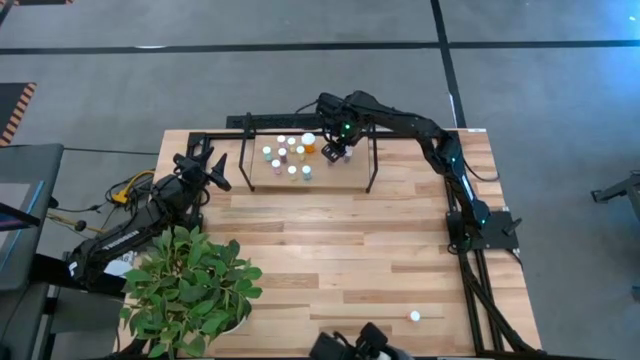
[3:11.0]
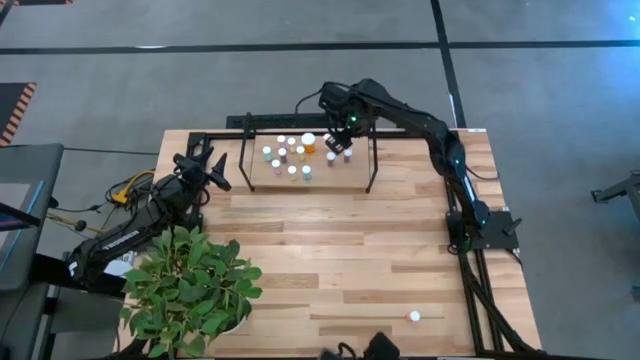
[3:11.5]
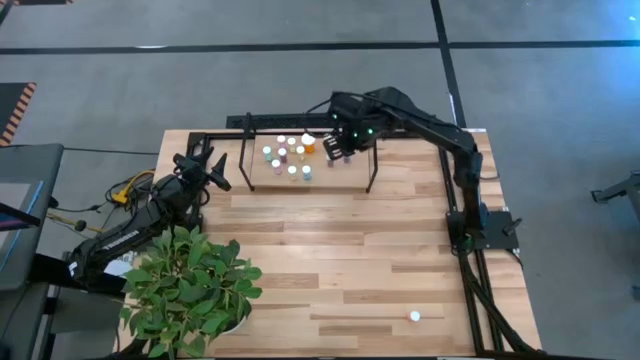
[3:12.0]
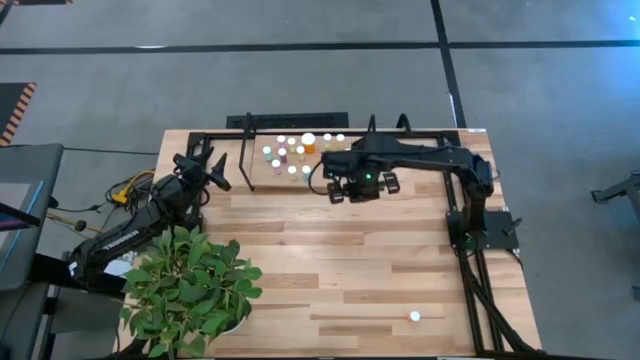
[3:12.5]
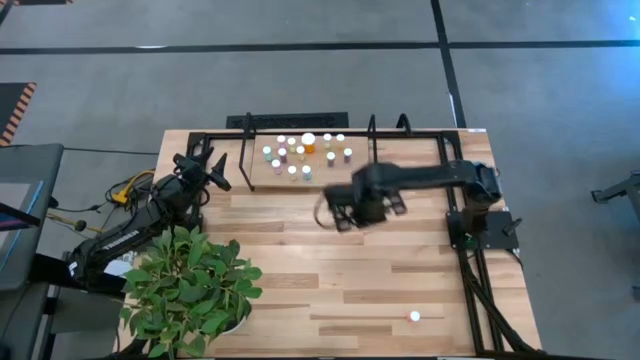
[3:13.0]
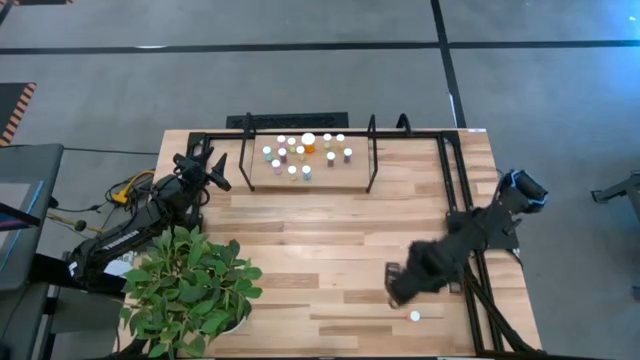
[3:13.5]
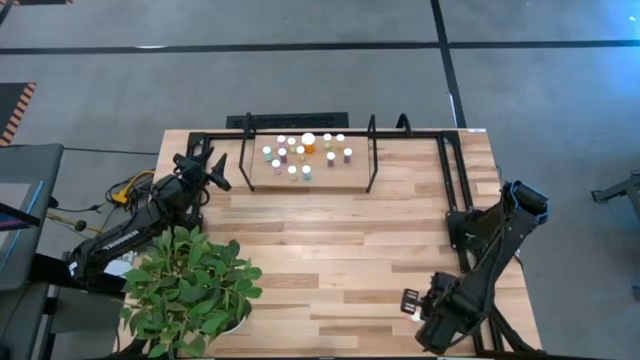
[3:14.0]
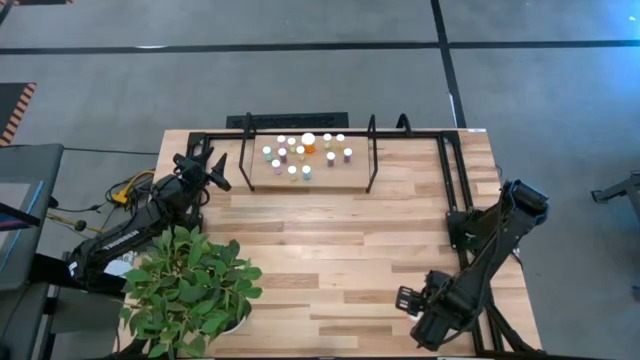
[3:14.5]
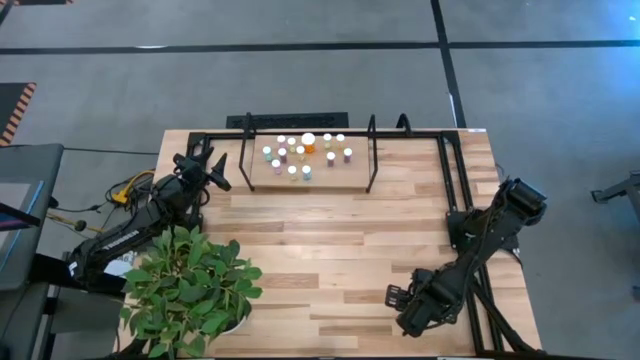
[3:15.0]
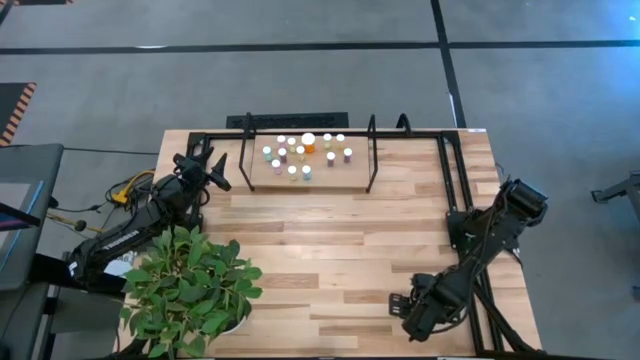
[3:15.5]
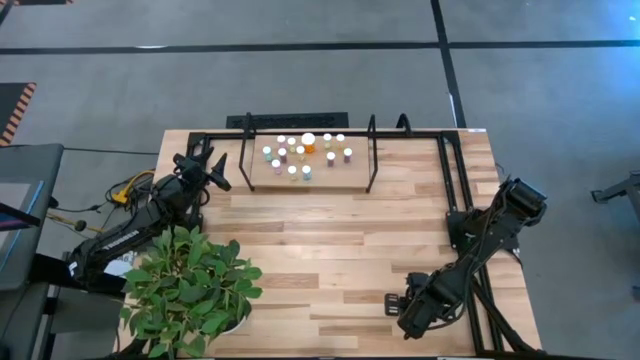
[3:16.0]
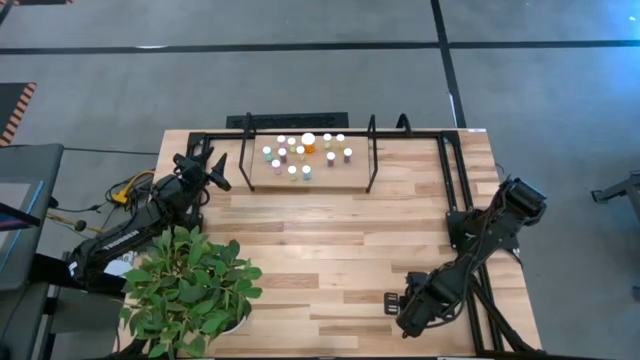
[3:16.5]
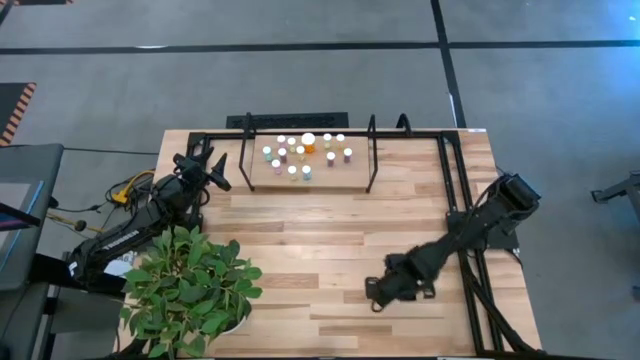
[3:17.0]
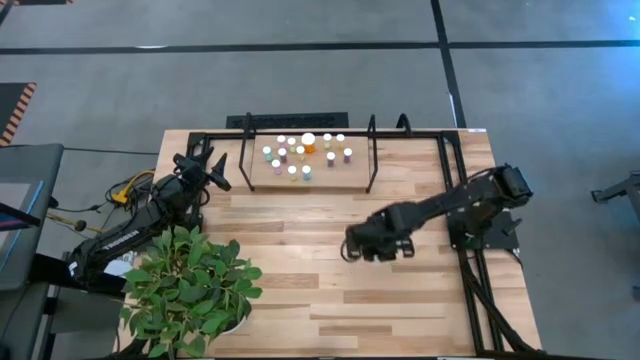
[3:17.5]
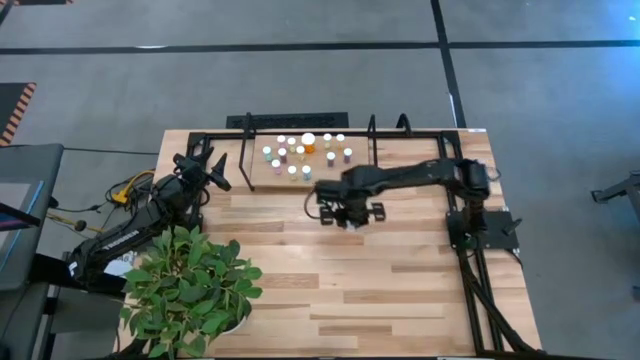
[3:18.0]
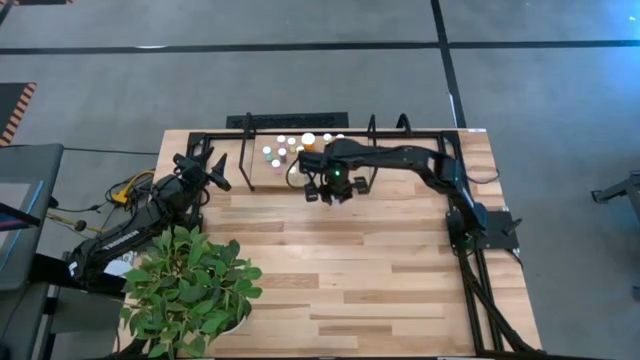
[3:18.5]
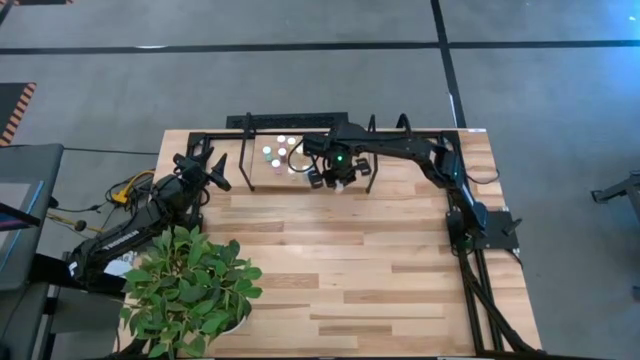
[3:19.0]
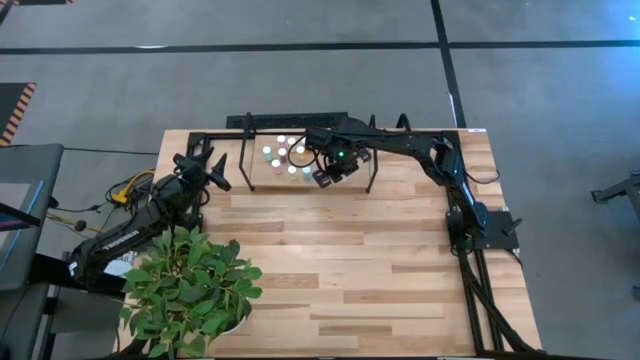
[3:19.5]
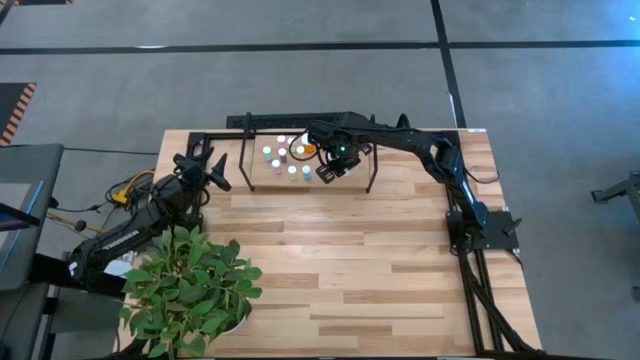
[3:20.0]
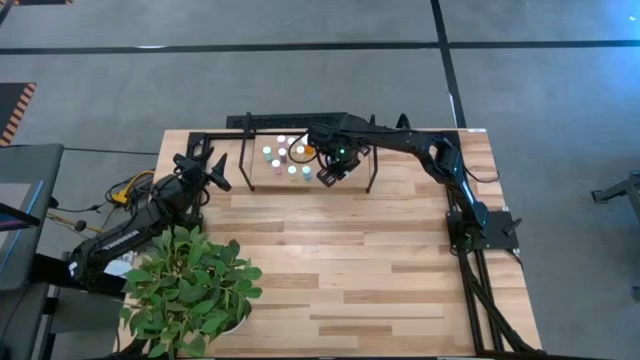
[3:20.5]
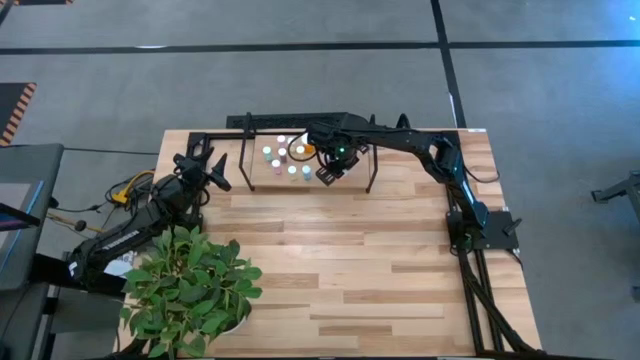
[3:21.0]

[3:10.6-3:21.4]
Task: Pick and place medicine bottles onto shelf by color
Put the red pill bottle on the shelf

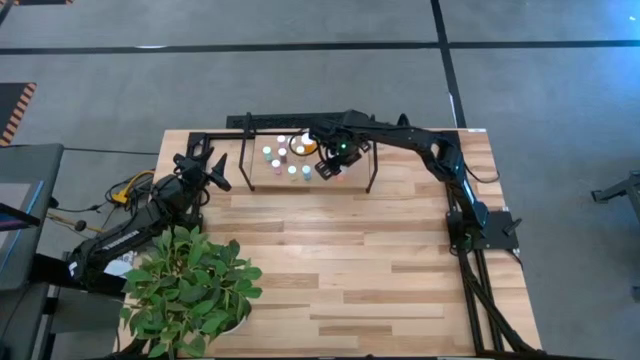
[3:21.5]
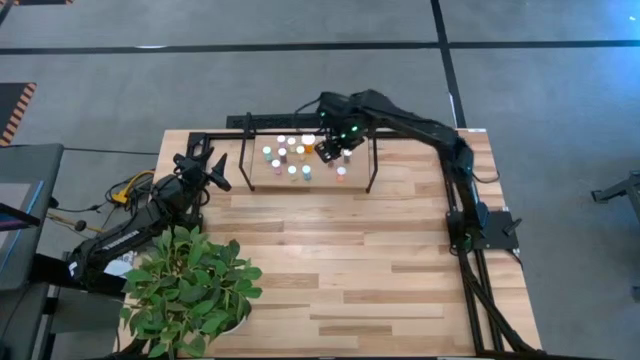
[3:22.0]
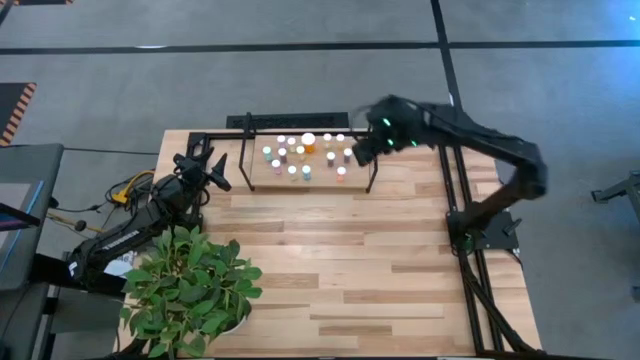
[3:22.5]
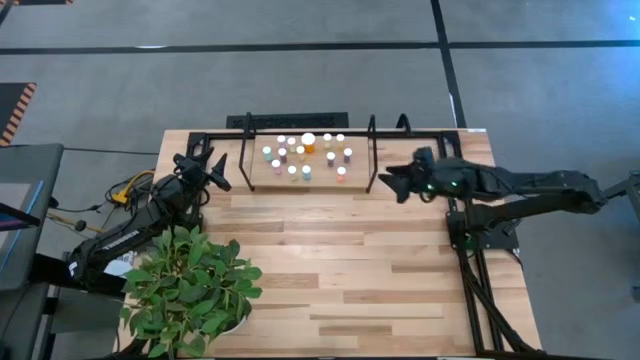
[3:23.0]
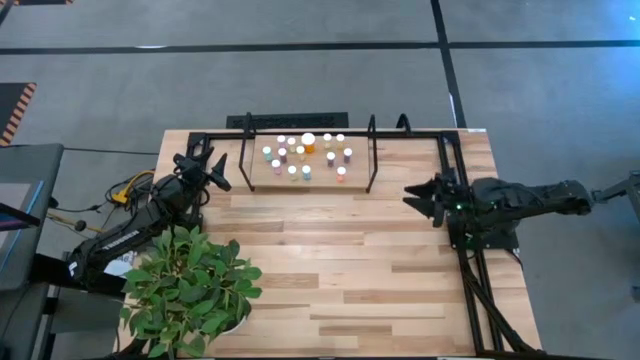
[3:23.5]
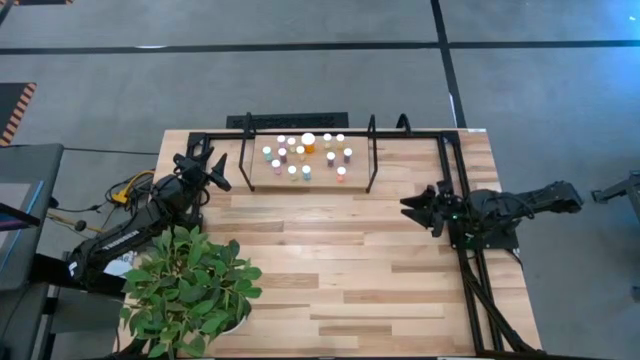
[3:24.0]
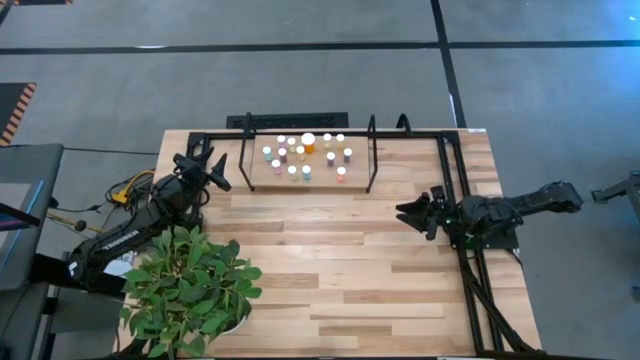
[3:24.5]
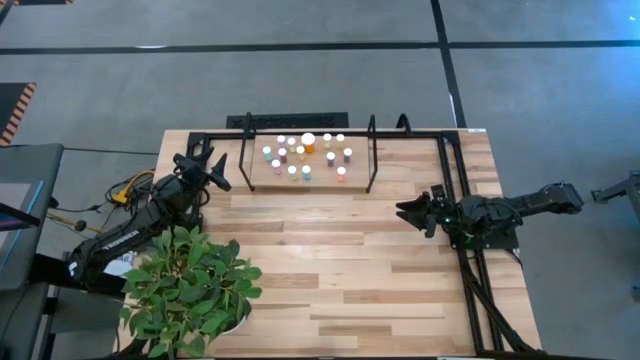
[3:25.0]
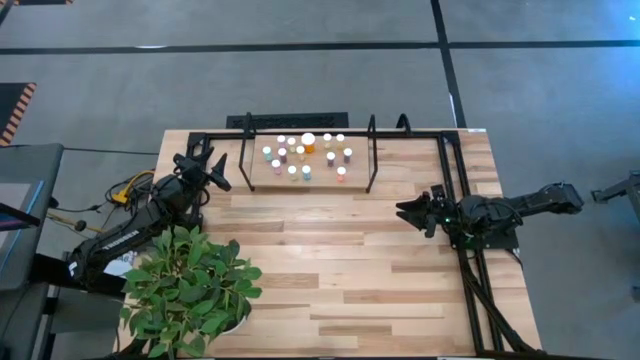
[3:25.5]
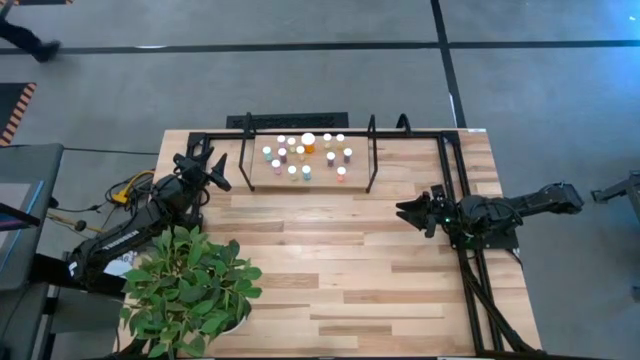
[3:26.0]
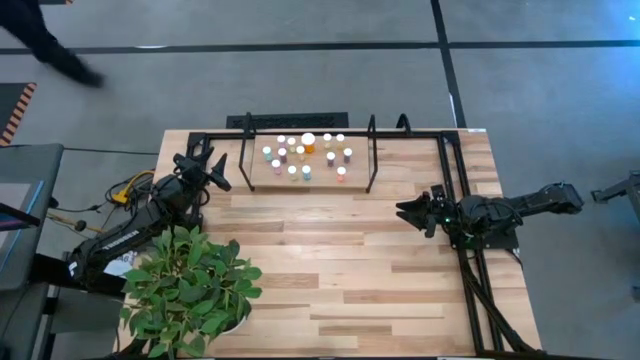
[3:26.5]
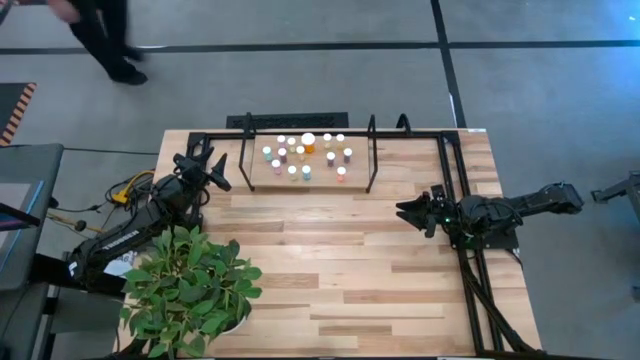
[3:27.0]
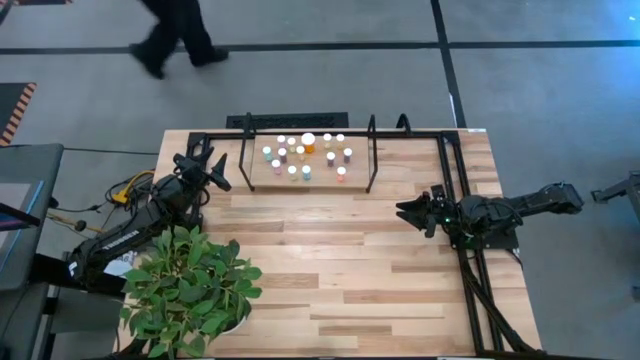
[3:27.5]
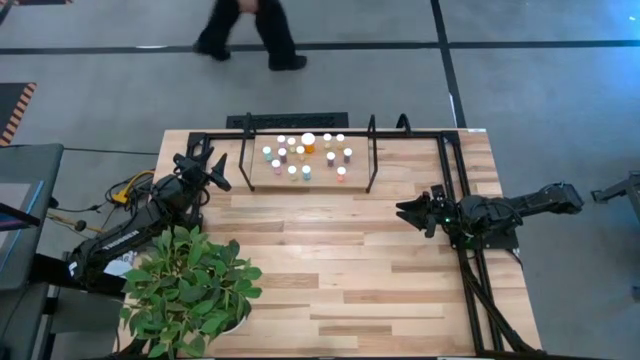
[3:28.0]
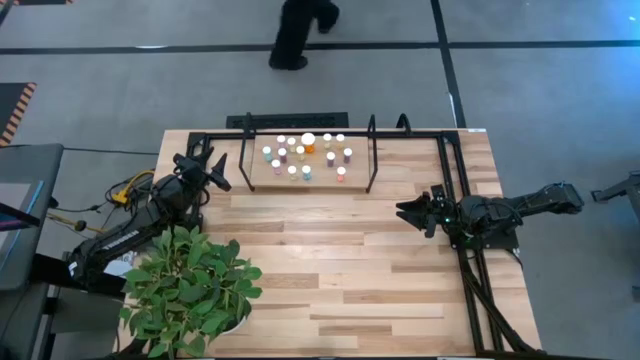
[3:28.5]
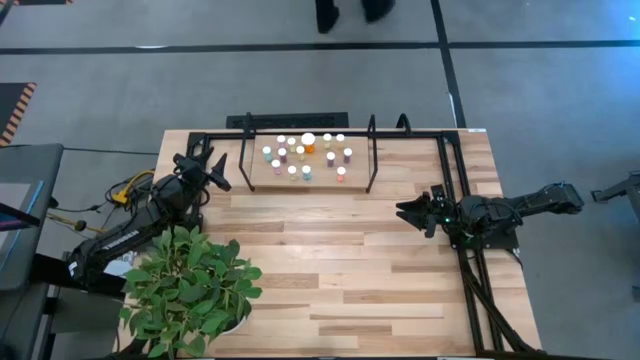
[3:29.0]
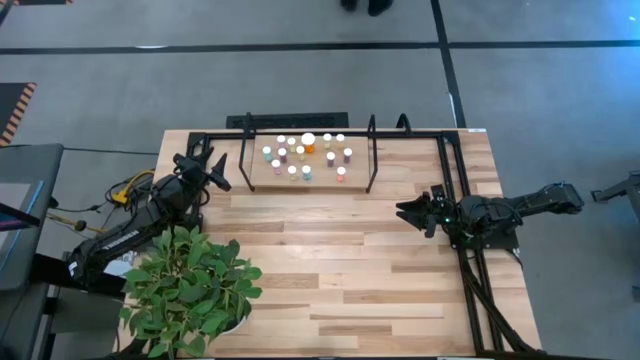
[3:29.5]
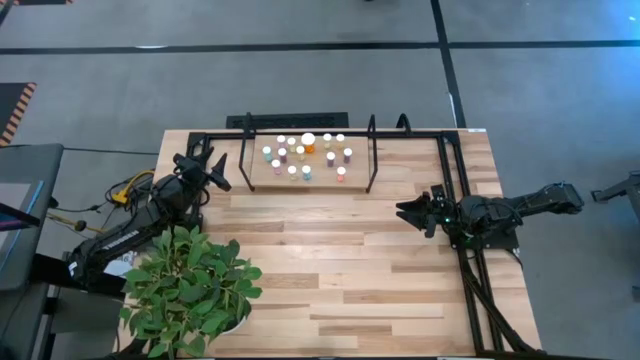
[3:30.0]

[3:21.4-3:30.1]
Return to Home Position

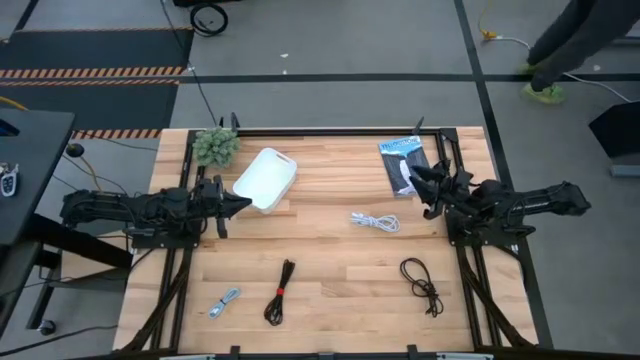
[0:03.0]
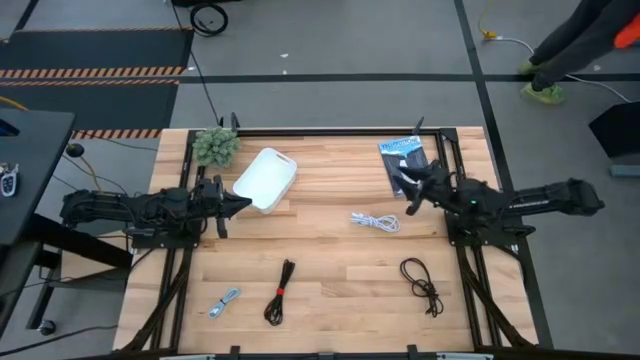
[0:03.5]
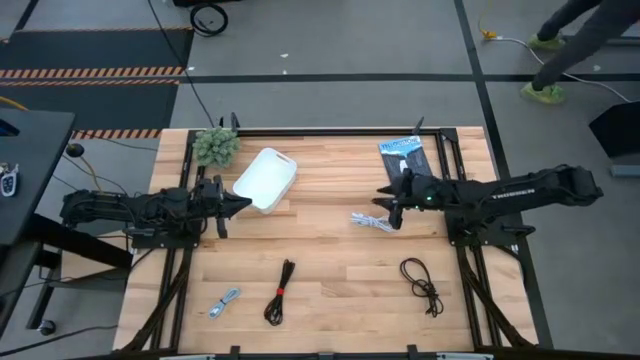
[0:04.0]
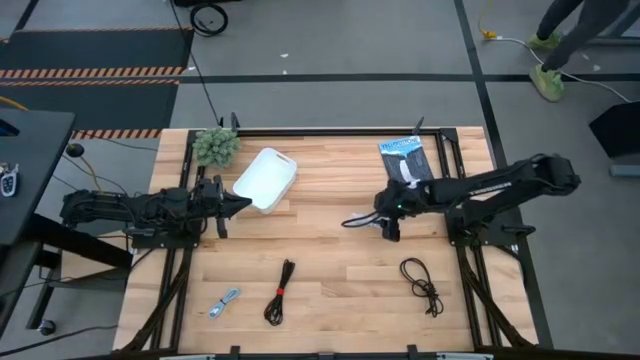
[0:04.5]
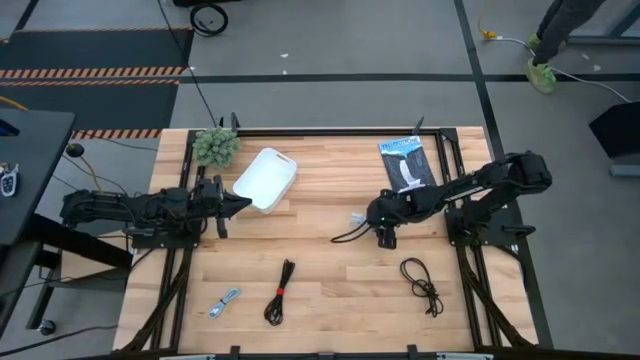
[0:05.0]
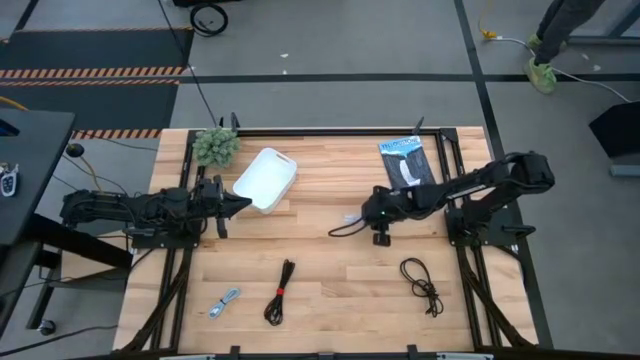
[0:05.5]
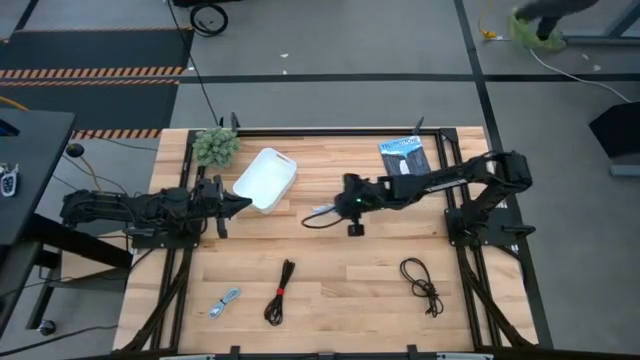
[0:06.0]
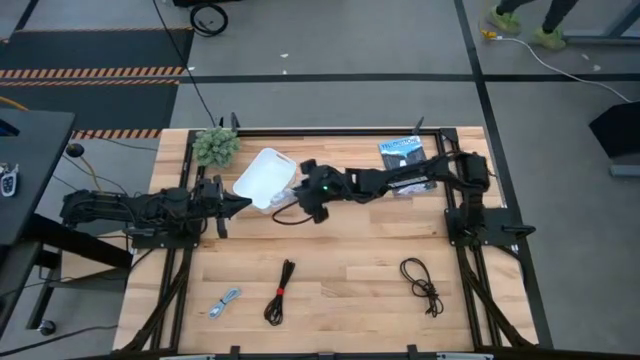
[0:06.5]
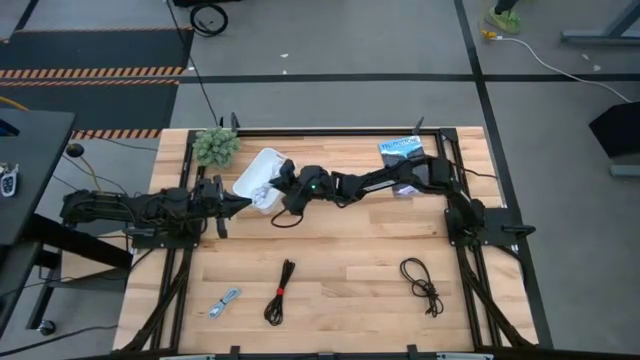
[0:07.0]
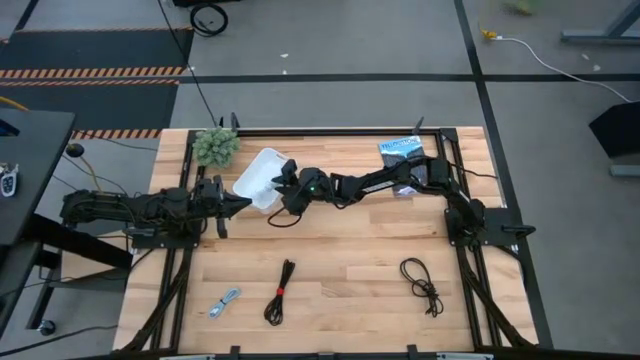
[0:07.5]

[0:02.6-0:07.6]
Task: Pick and place USB-C Cables
Put the white charger cable into the white bin
